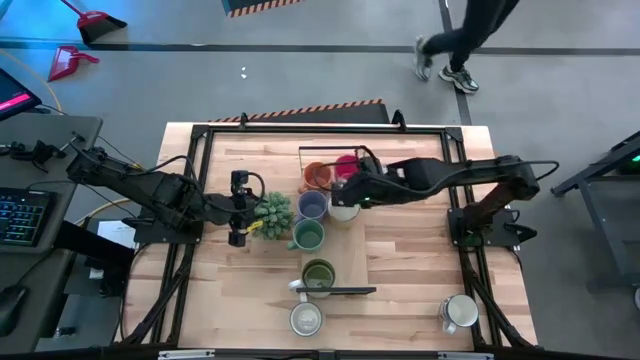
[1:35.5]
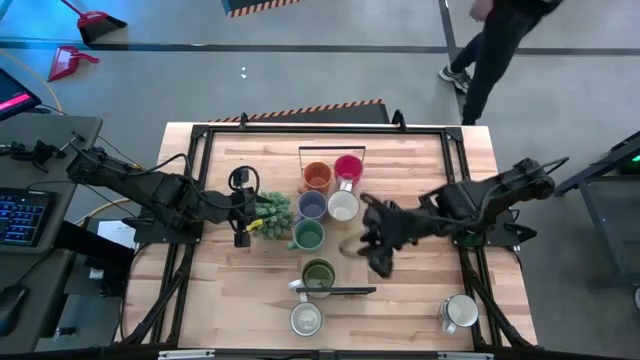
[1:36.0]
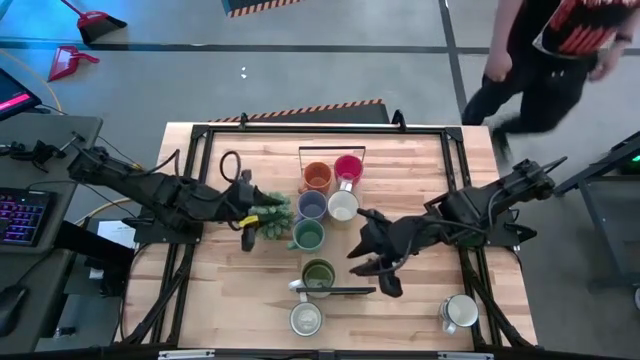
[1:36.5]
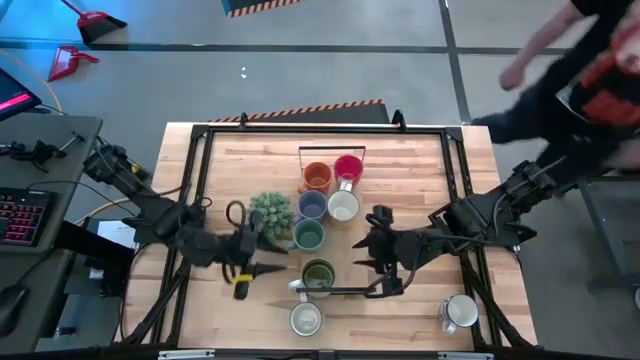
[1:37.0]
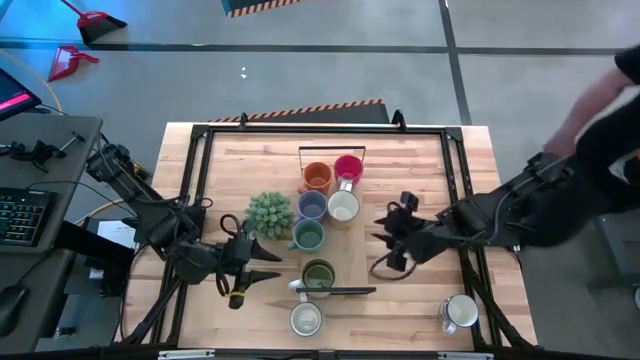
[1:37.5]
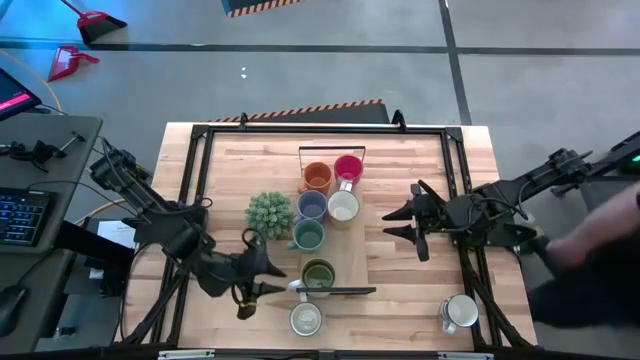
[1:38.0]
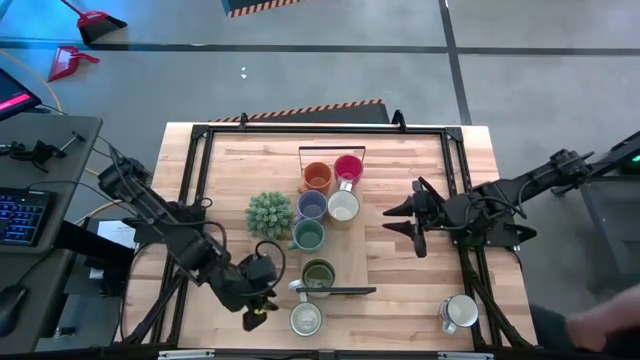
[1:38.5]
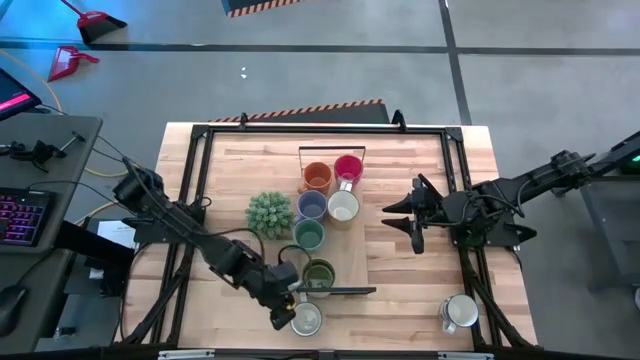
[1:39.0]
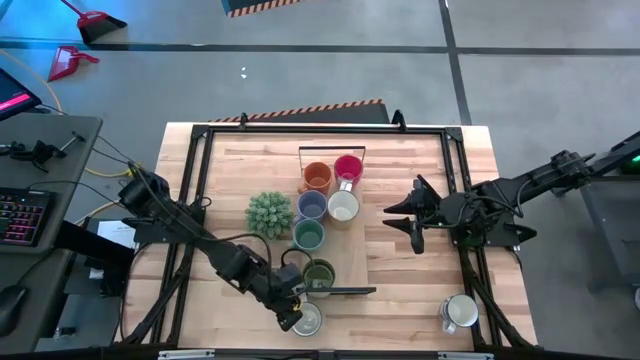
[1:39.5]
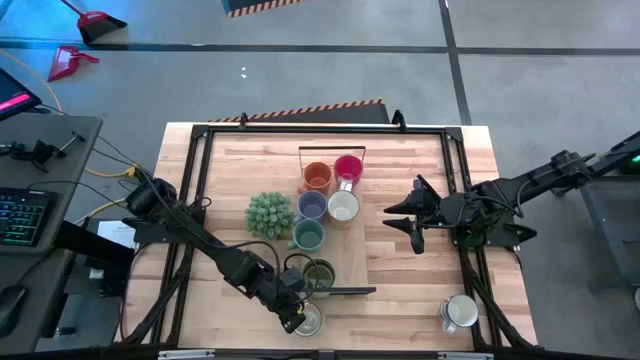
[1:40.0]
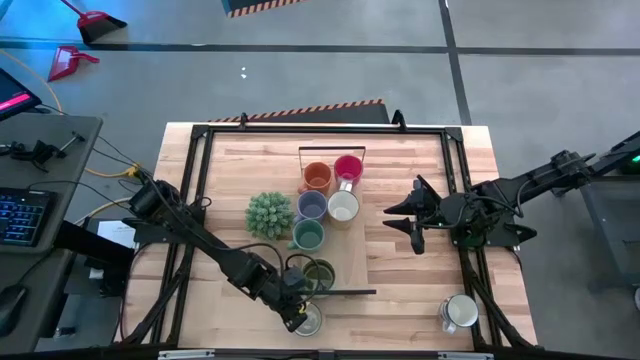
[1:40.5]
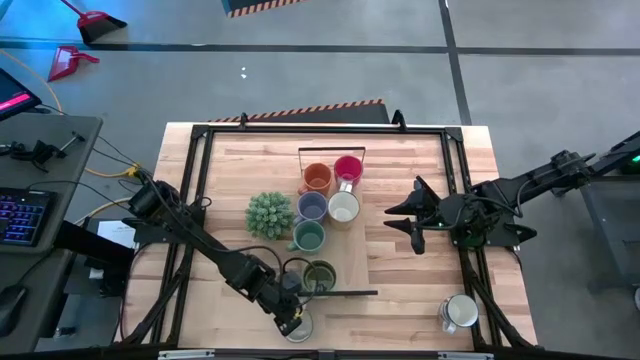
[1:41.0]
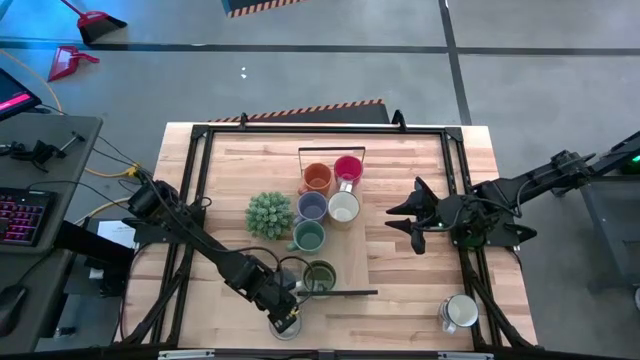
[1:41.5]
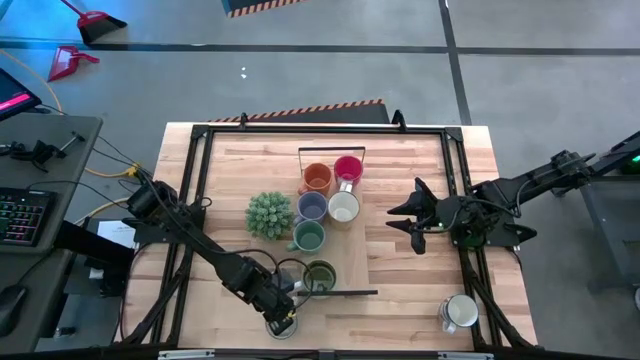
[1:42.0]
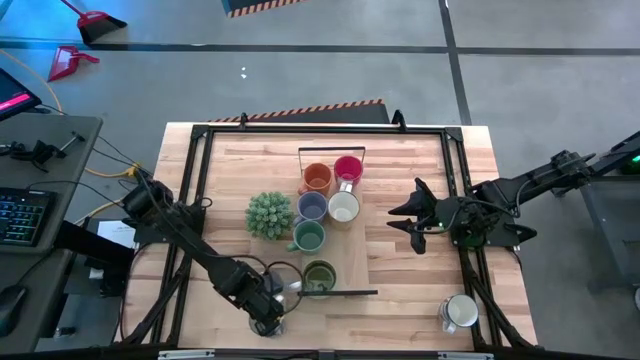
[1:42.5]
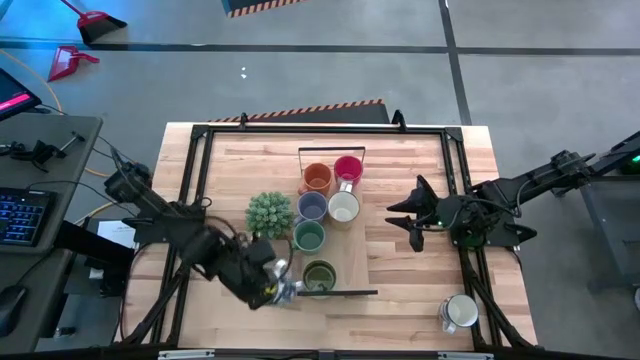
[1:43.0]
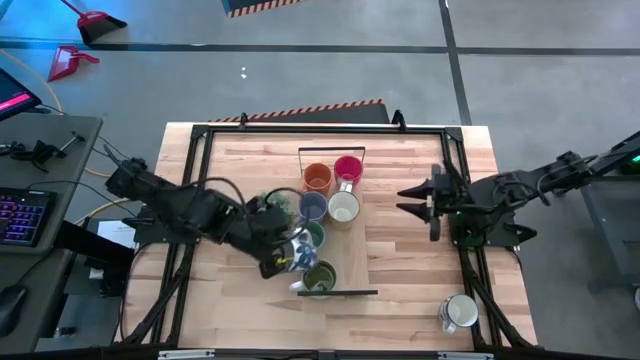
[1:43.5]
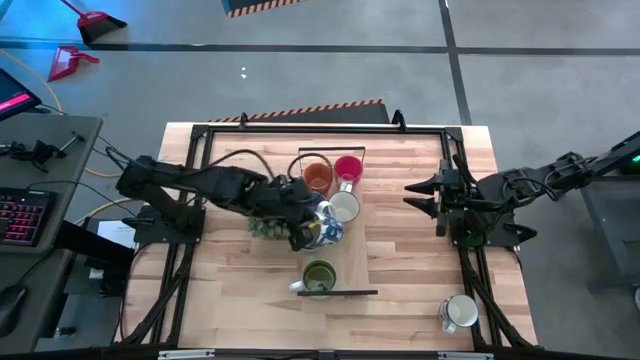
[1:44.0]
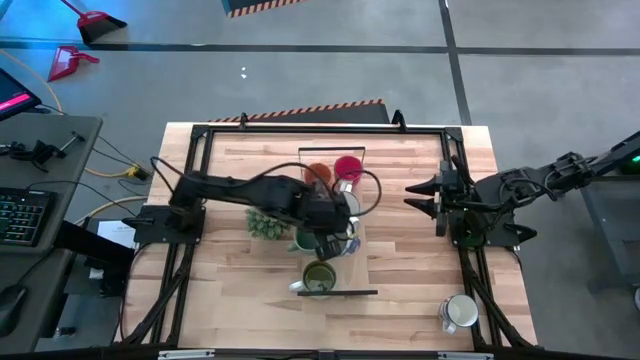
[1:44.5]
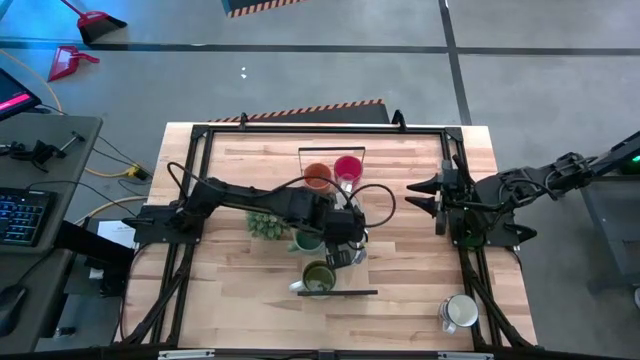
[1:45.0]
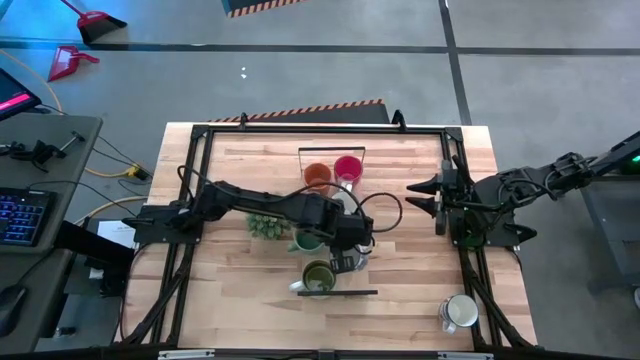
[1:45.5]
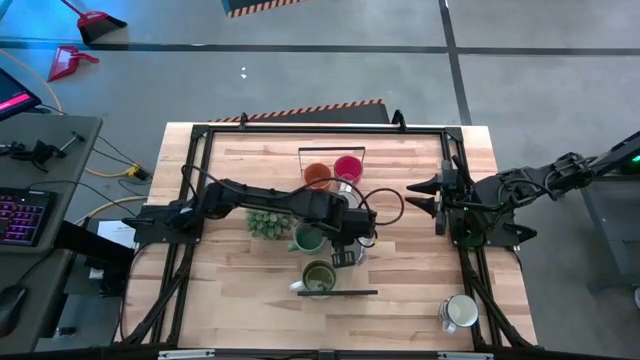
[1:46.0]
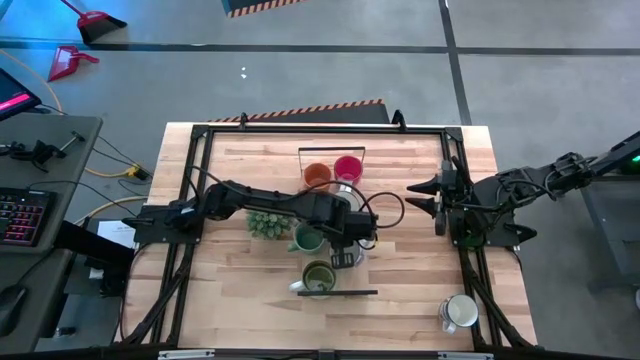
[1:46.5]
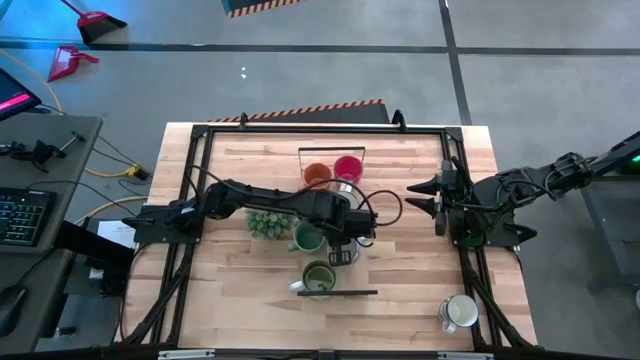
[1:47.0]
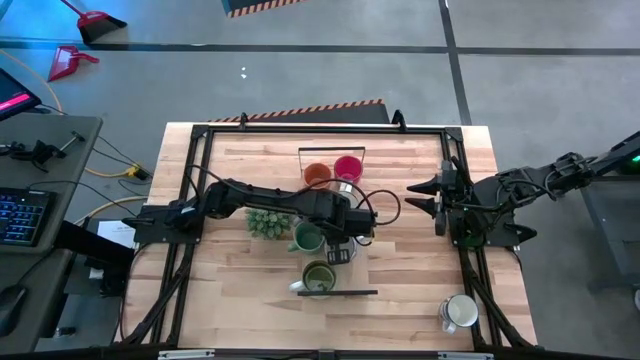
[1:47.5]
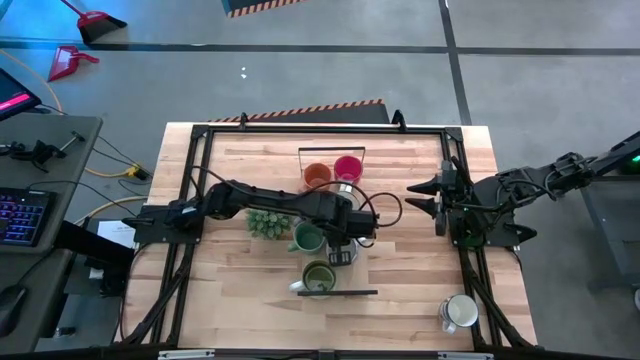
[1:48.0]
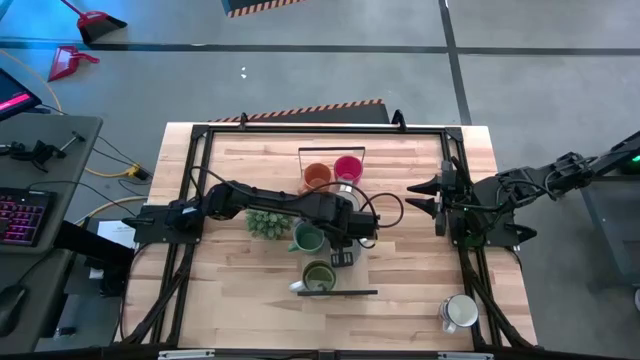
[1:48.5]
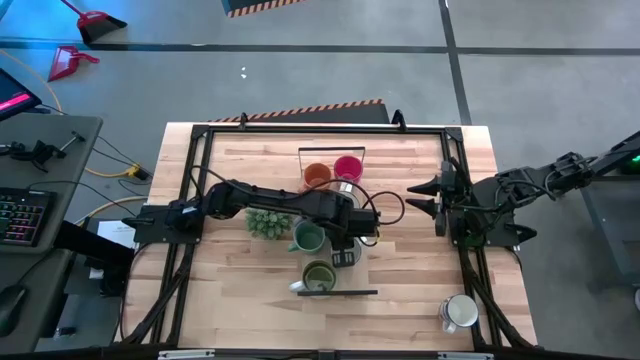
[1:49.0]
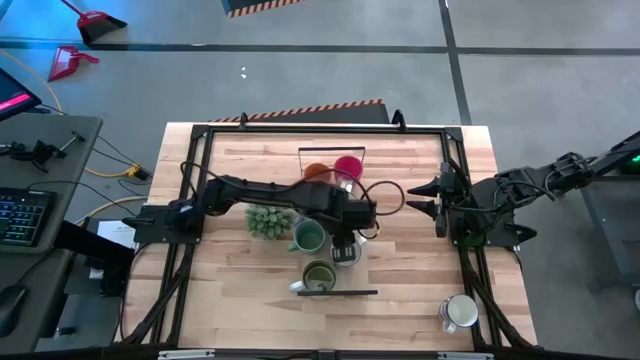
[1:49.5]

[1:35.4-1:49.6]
Task: Place coffee mugs
Put the left blue mug on the shelf

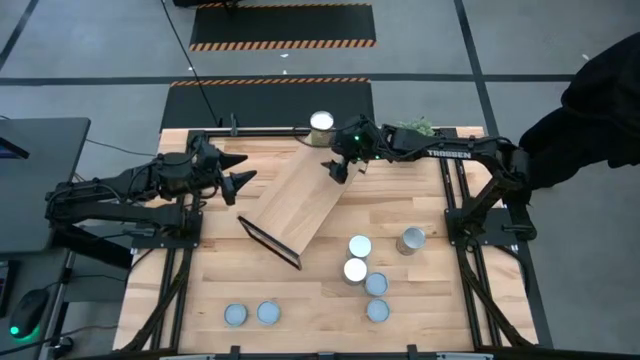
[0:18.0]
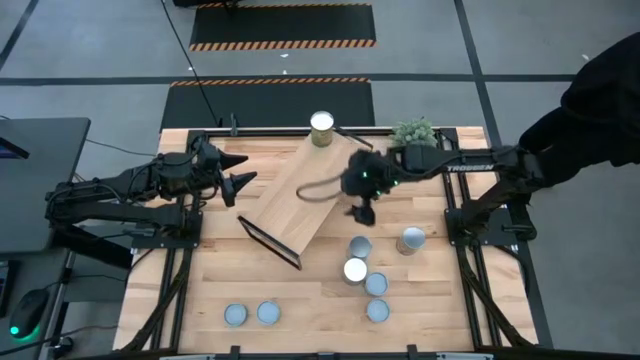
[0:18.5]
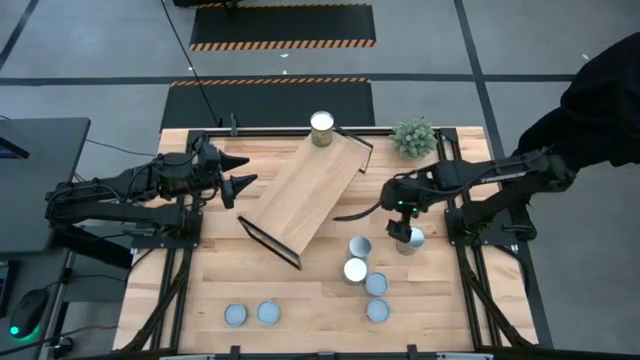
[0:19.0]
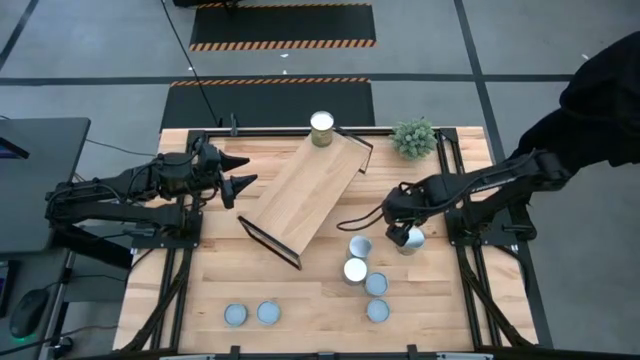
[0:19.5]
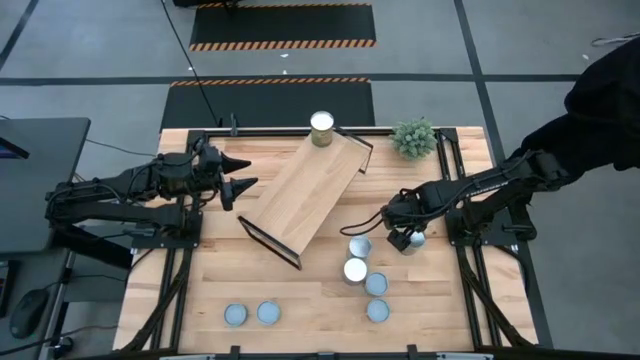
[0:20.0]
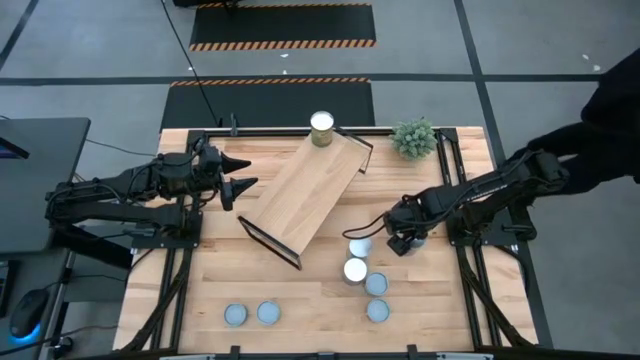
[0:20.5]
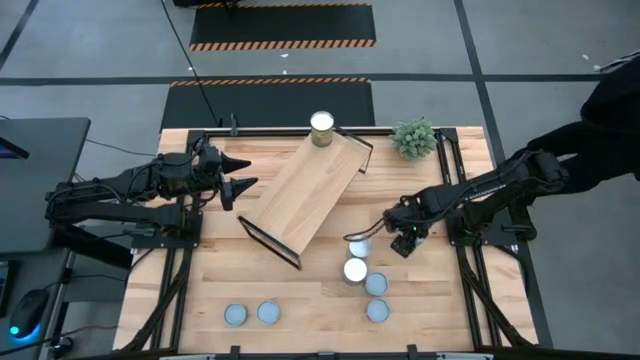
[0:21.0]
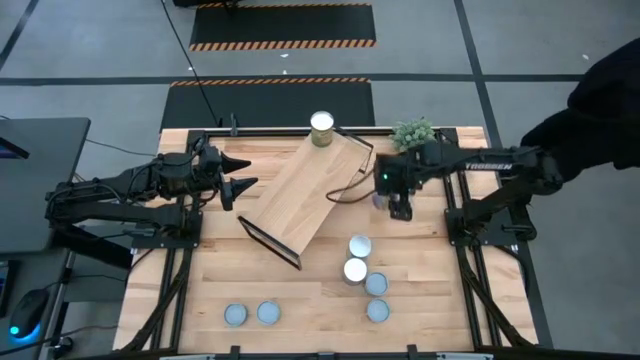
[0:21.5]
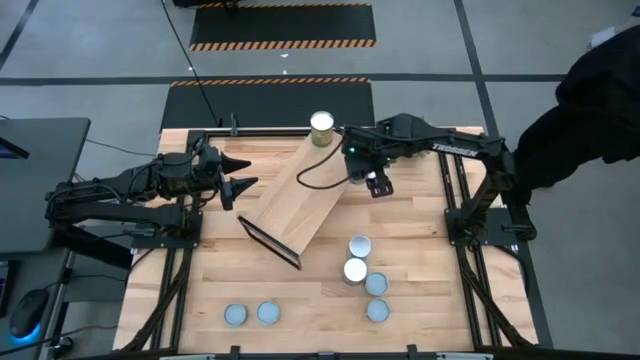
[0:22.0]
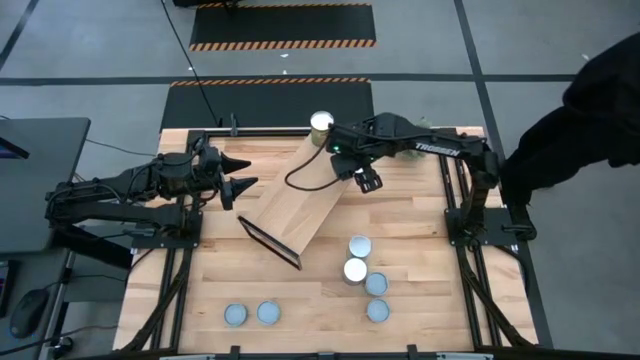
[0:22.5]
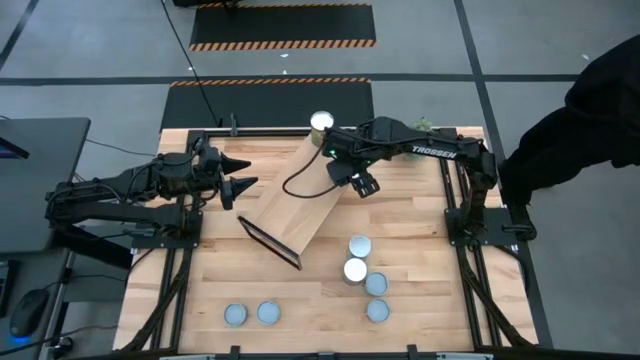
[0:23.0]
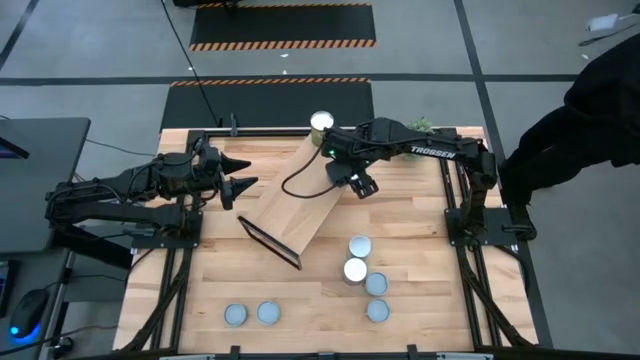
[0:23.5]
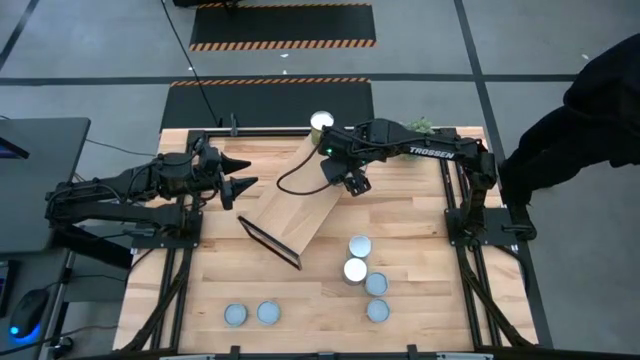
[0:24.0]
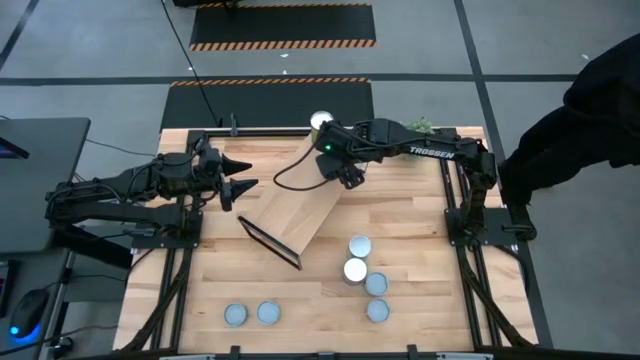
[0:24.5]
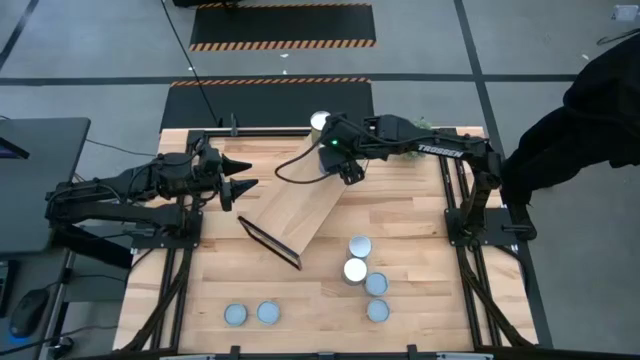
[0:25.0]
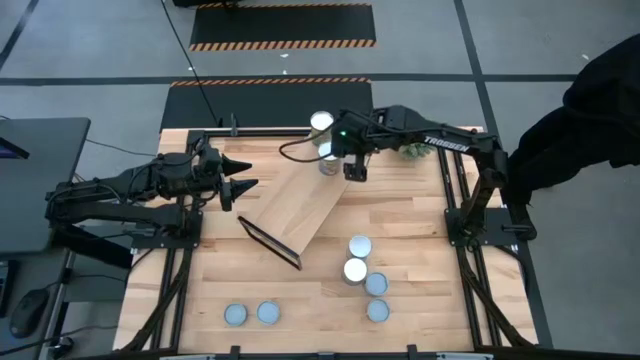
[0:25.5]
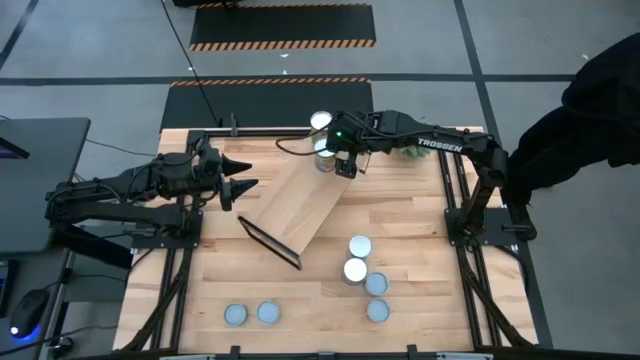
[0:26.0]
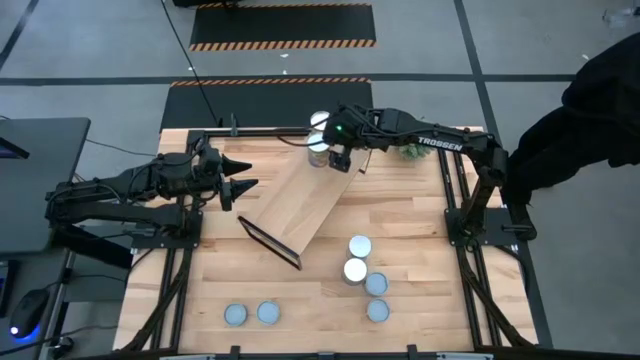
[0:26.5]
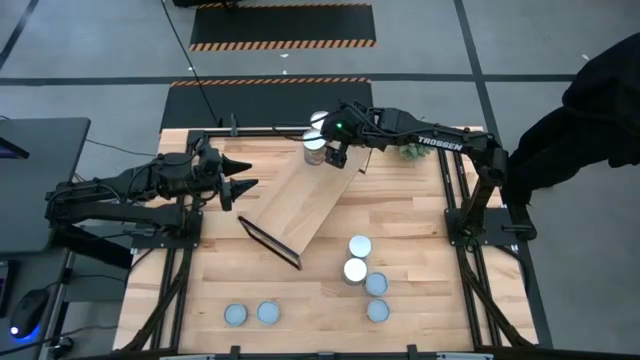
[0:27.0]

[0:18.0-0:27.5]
Task: Pick and place cans onto a shelf
Put the canned peaches on the shelf
